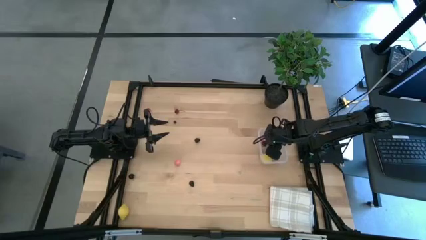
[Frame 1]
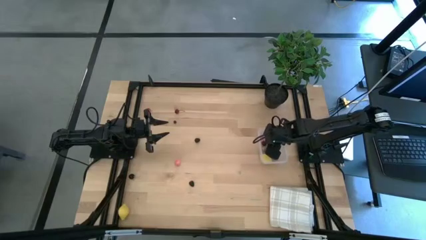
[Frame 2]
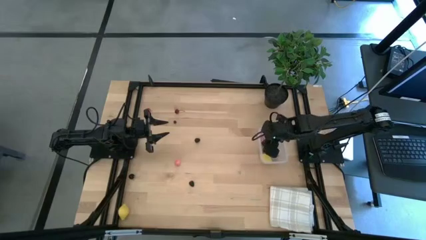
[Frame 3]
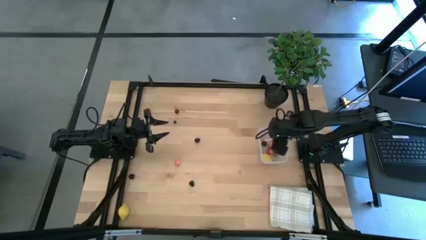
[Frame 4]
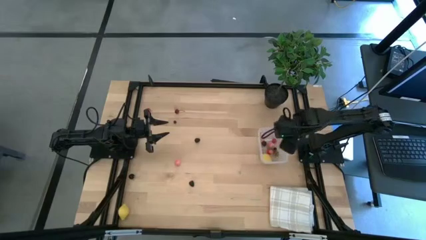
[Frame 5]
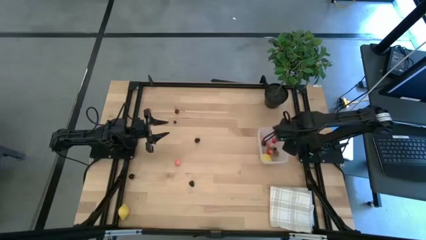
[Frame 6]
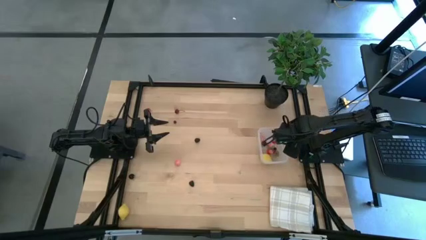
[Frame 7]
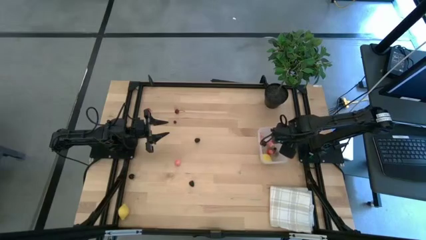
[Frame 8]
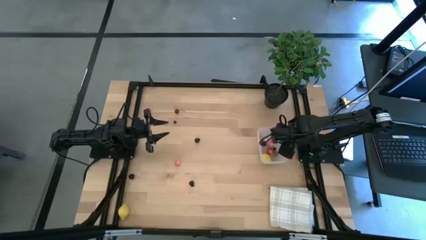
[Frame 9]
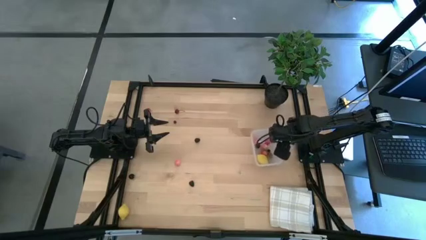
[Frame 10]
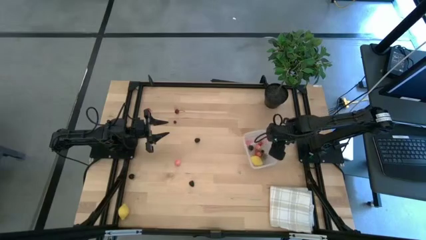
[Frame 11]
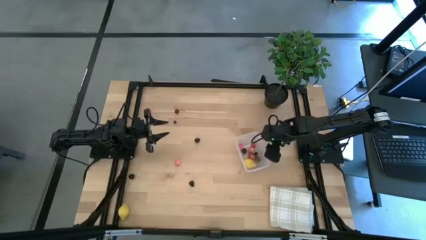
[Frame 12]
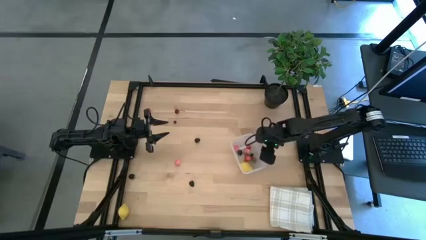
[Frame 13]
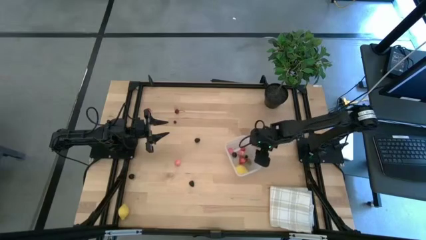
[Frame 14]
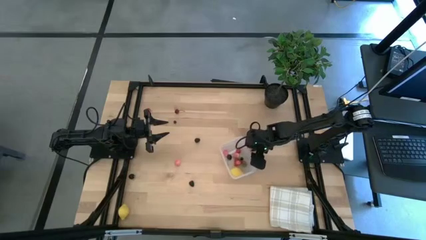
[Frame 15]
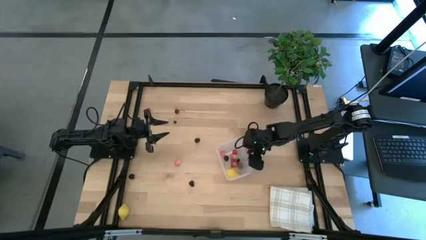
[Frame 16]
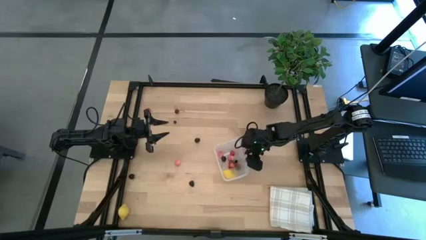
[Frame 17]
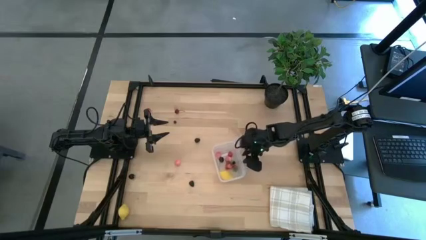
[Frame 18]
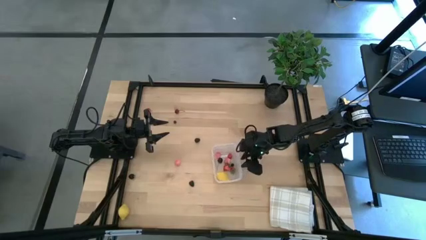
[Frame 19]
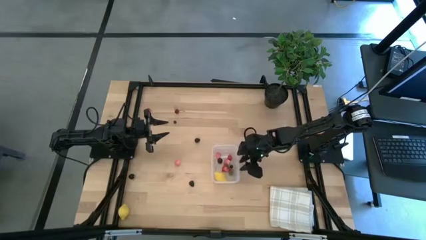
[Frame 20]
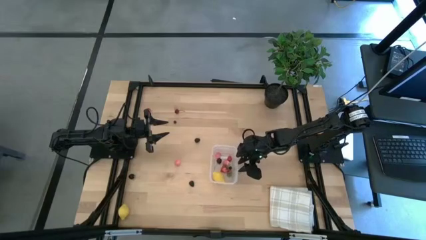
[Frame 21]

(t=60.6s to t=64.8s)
Task: Pick and placing Produce into tupperware
Move the transparent bin to the center of the table

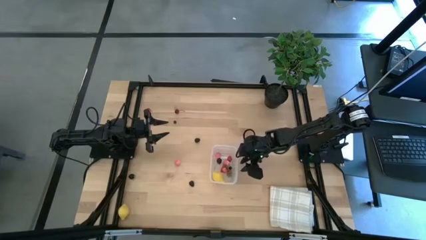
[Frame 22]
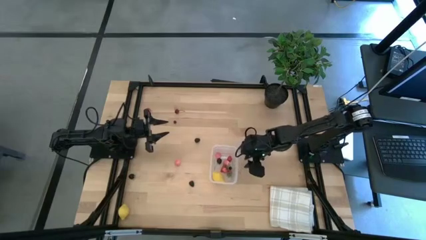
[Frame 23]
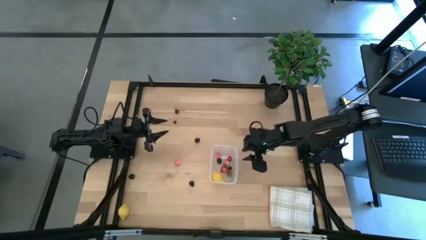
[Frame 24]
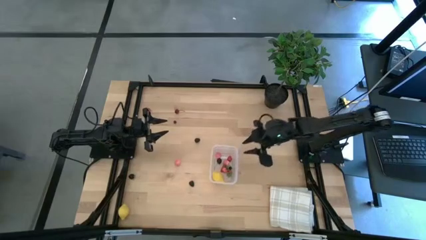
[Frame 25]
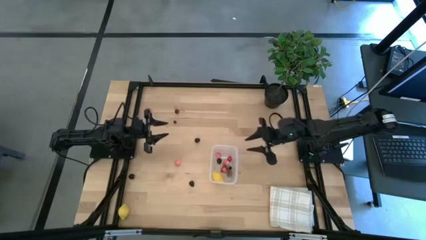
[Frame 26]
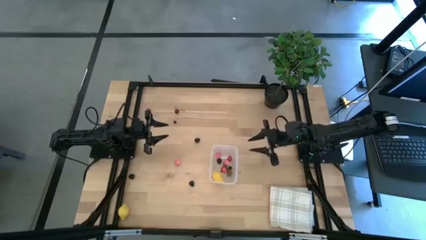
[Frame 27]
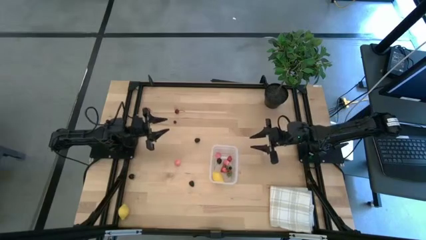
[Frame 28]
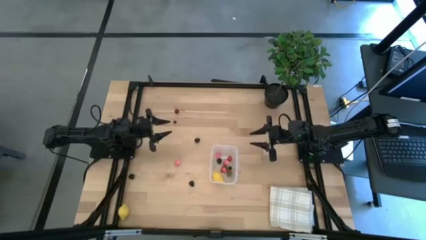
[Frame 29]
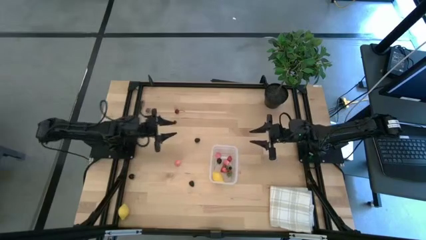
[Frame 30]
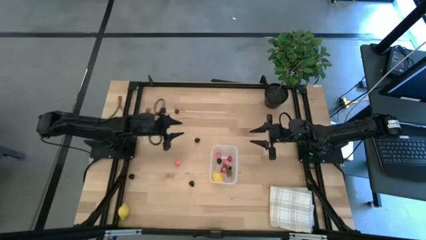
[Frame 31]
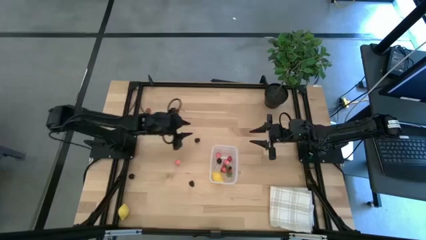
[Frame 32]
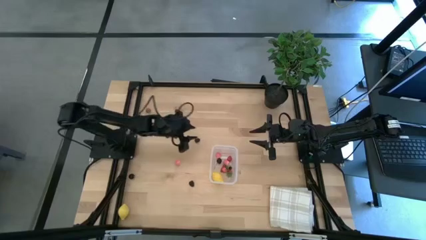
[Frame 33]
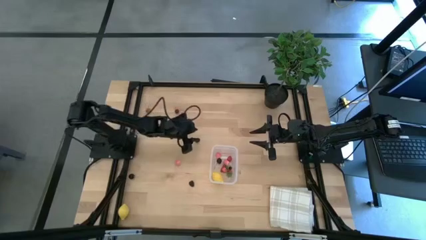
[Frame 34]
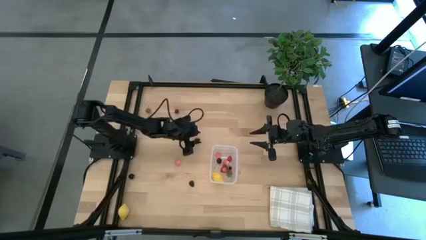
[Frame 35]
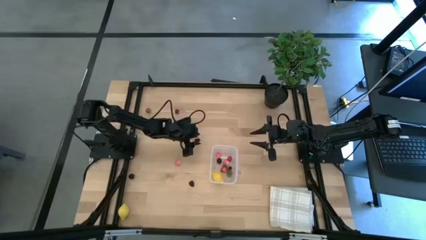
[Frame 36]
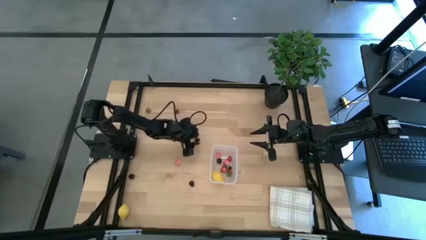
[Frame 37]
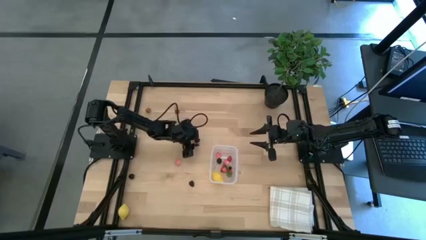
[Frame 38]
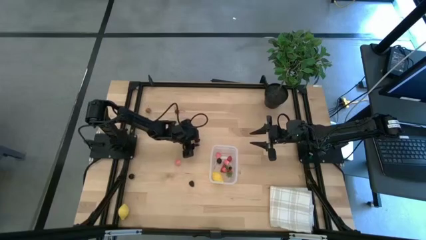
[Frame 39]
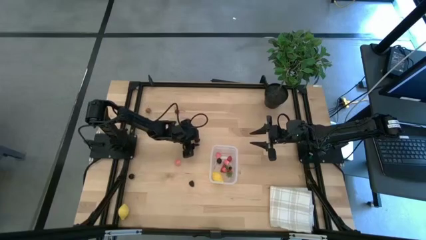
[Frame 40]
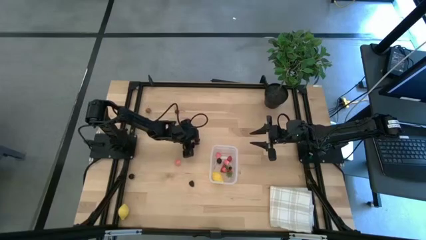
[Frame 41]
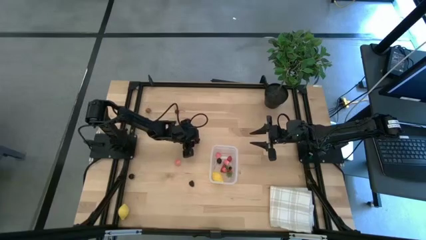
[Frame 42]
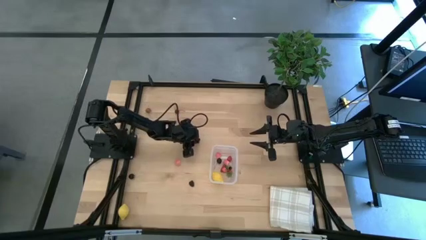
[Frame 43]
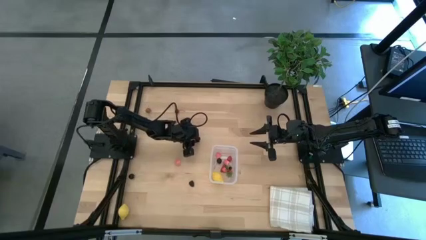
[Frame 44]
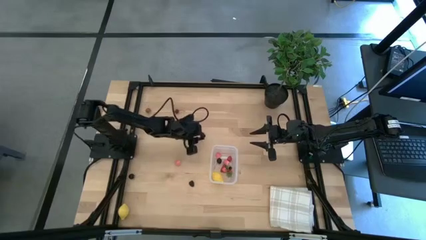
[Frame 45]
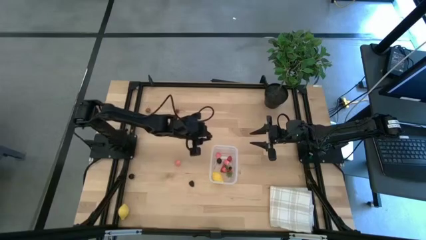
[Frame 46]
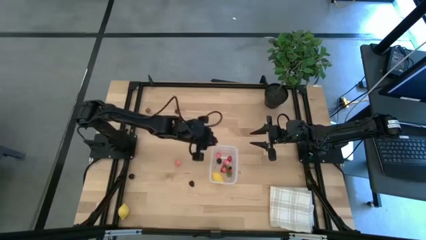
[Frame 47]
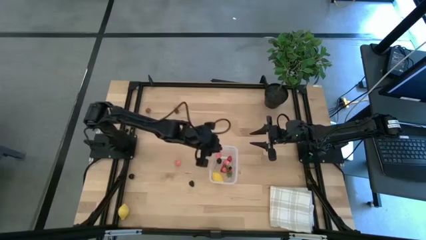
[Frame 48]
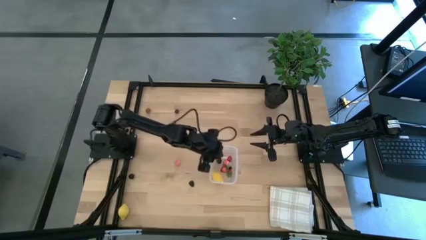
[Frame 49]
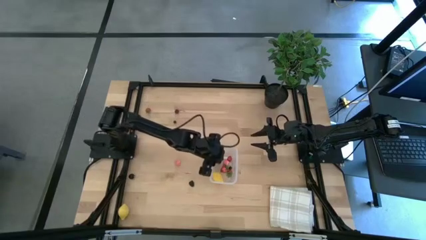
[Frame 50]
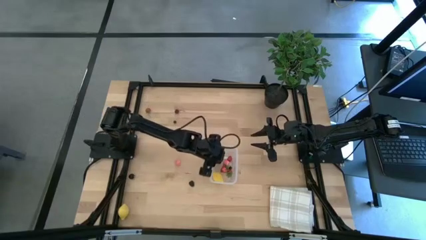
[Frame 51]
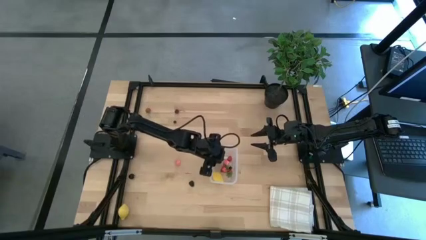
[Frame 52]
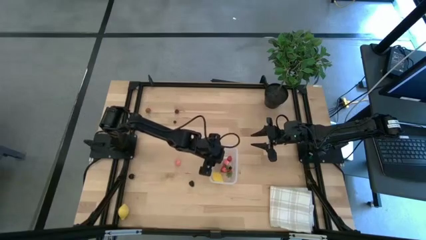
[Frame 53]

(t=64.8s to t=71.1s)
Put the top blackberry into the transparent bin

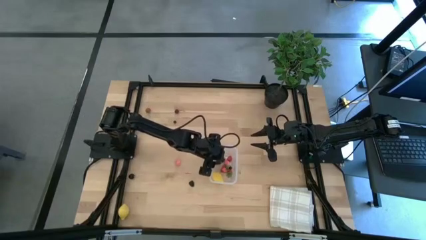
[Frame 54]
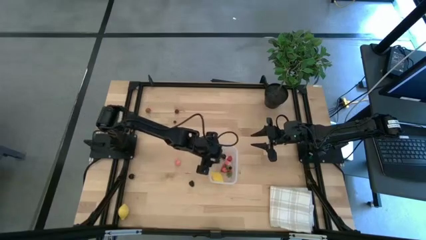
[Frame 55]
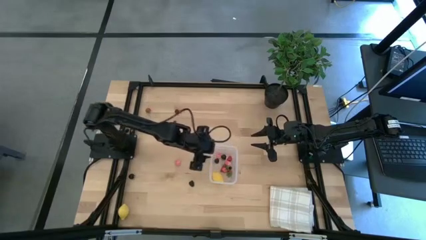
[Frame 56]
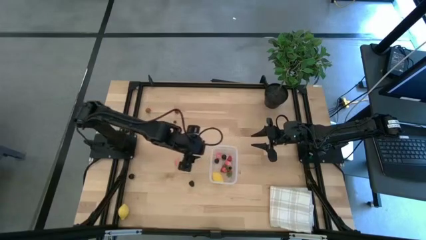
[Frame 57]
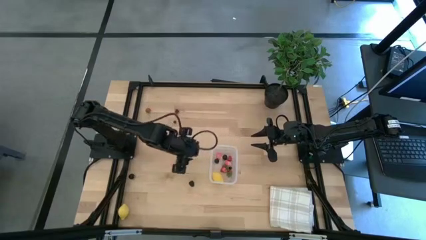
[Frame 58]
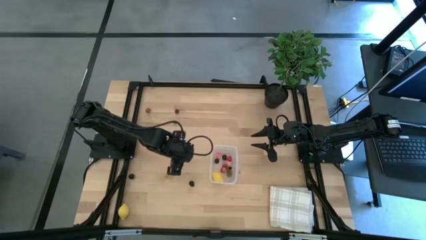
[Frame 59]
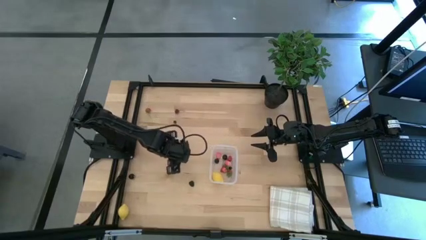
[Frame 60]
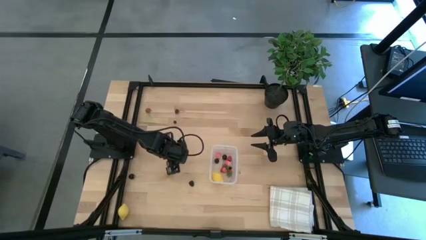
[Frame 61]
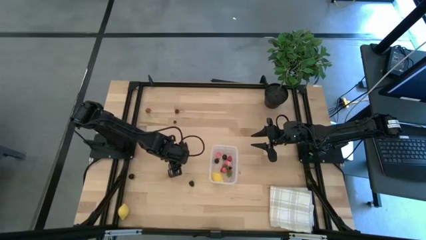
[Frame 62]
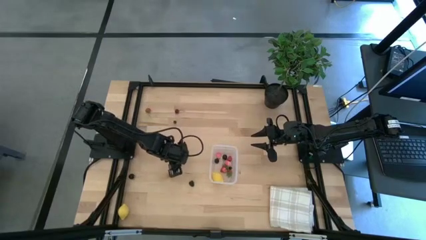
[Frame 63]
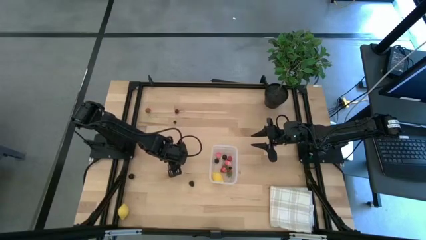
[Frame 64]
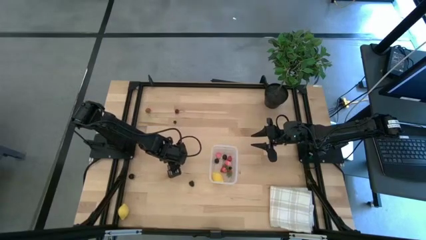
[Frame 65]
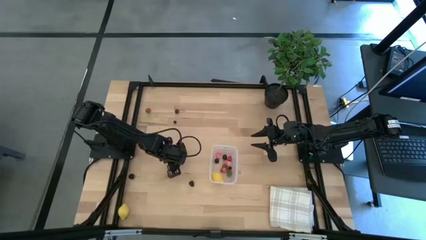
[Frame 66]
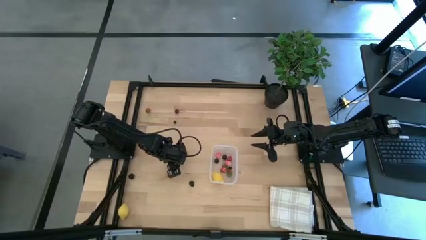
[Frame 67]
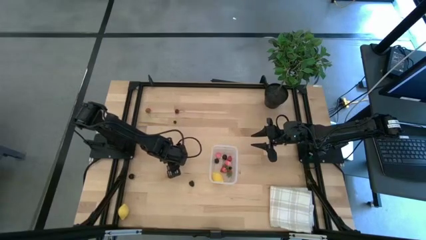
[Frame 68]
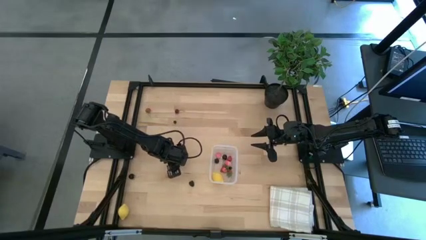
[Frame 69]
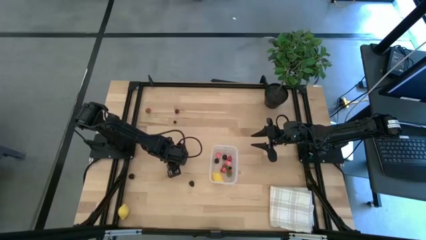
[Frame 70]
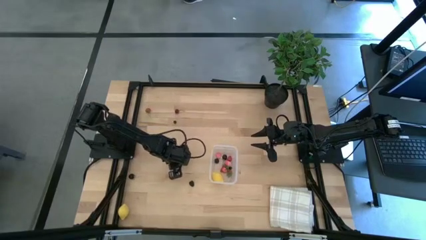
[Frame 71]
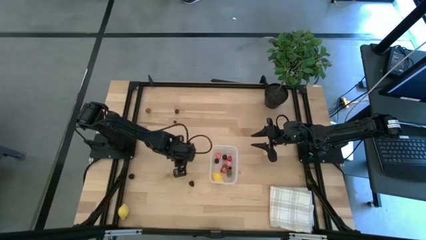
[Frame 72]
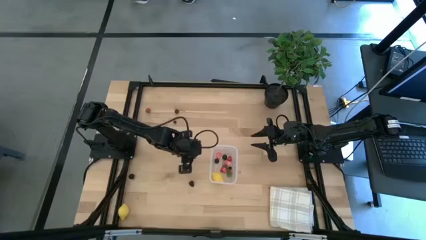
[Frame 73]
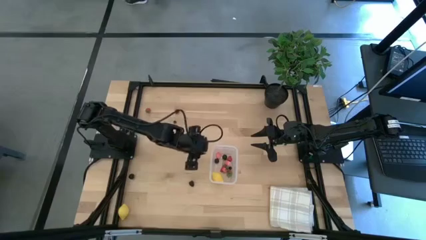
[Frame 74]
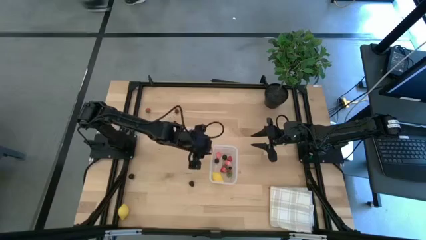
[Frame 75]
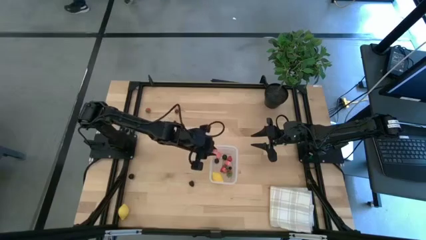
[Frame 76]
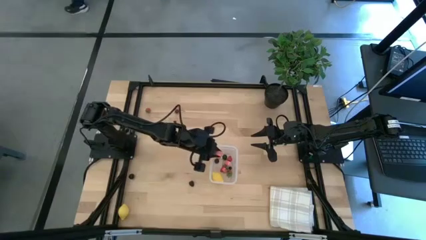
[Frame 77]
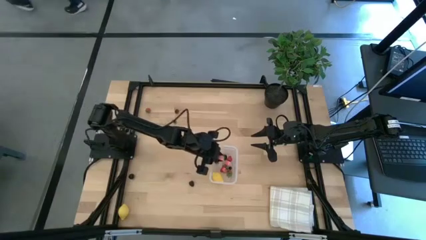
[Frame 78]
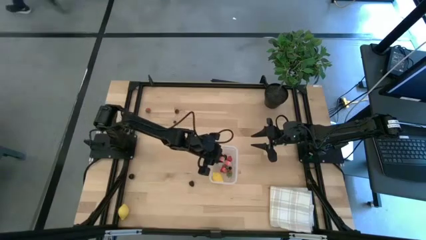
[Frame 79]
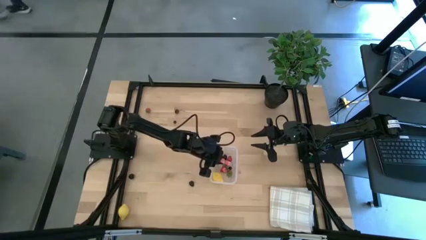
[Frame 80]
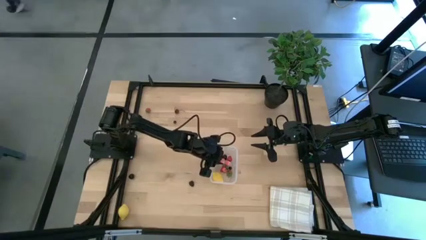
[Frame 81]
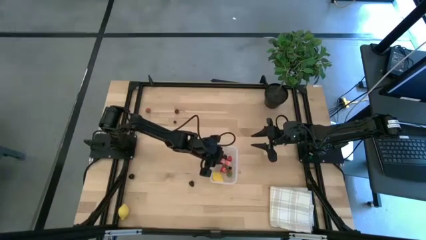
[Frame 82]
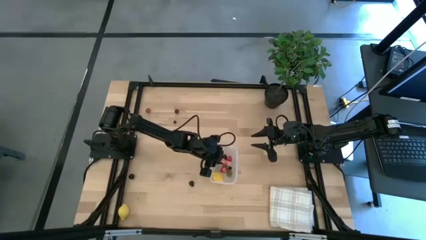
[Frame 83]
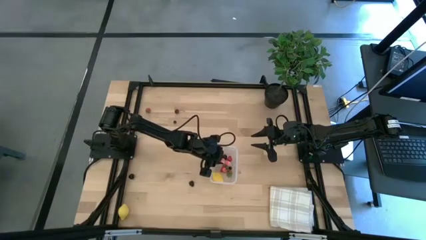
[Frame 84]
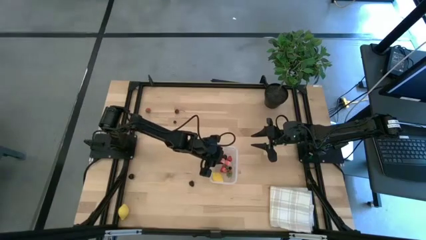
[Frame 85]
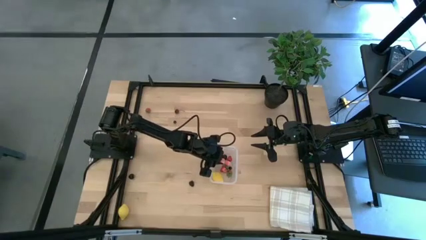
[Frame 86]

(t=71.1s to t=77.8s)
Put the peach into the transparent bin
